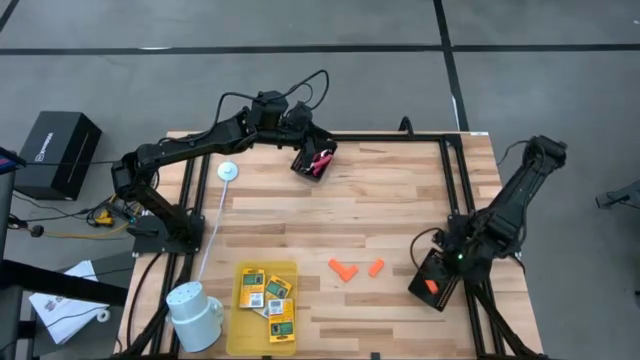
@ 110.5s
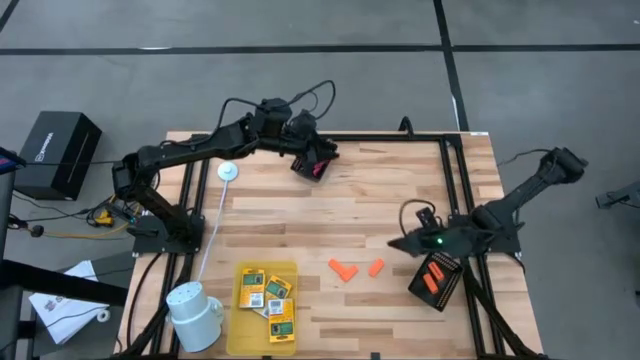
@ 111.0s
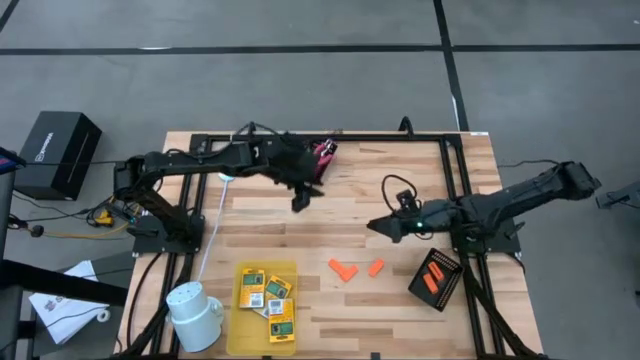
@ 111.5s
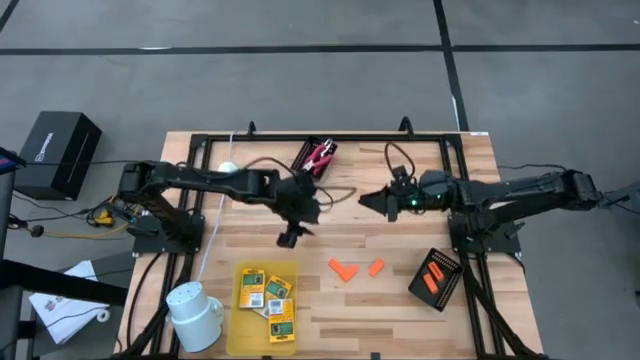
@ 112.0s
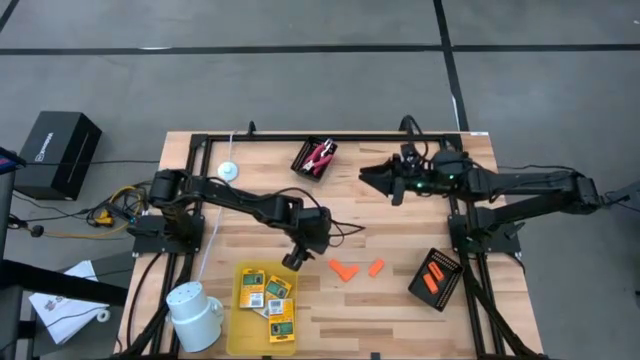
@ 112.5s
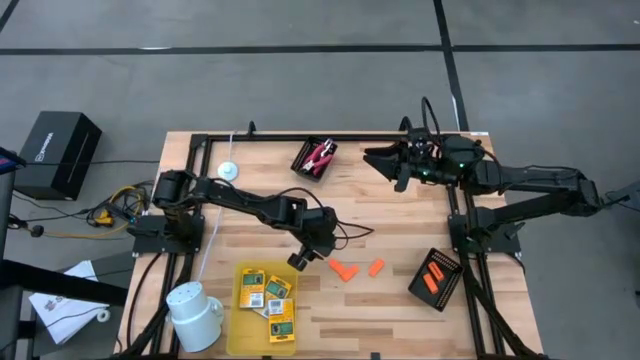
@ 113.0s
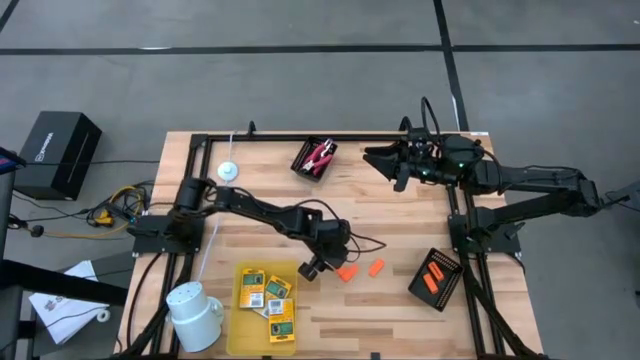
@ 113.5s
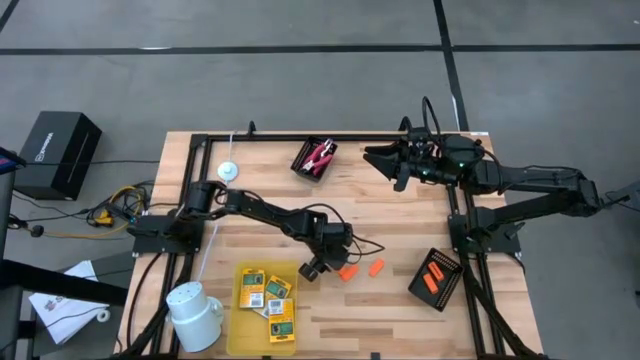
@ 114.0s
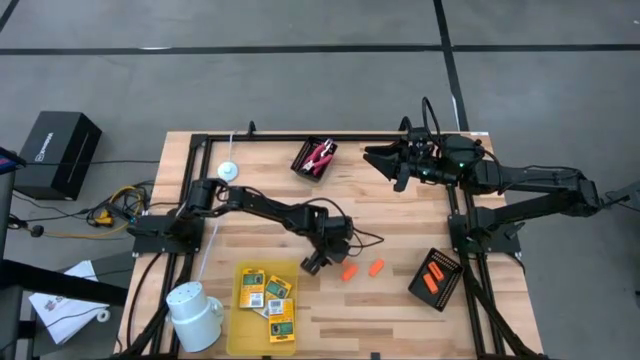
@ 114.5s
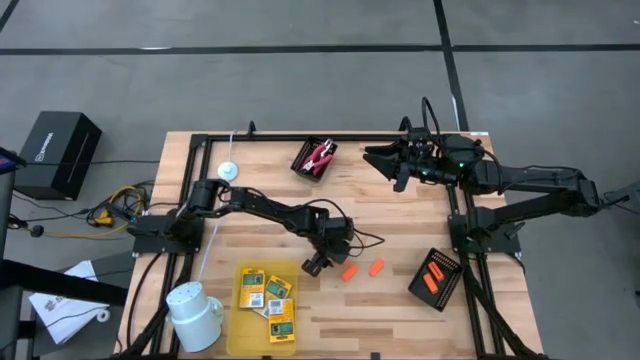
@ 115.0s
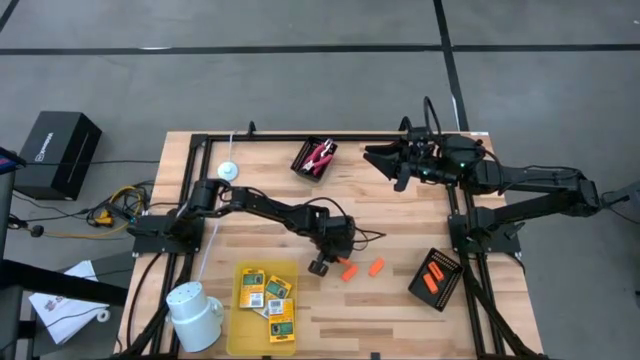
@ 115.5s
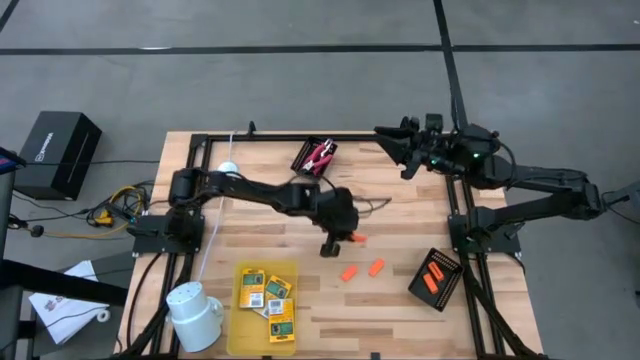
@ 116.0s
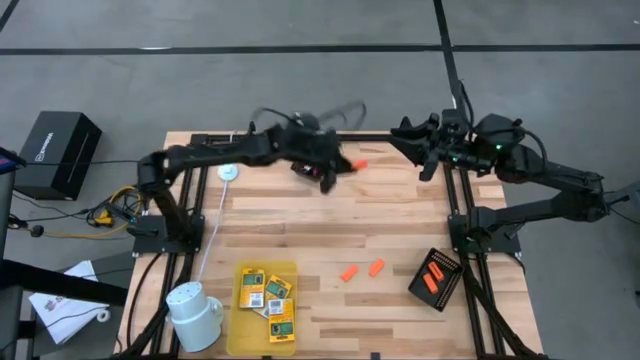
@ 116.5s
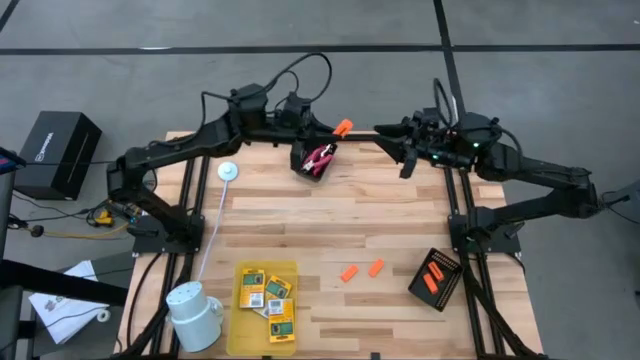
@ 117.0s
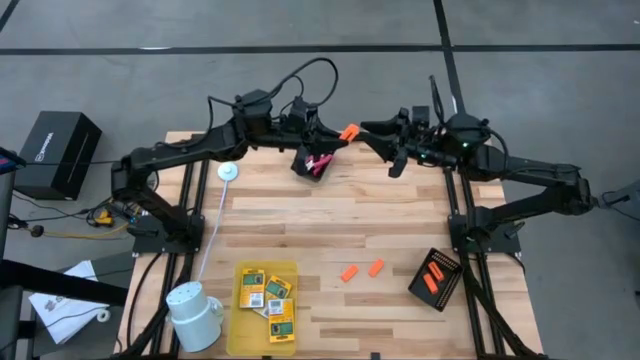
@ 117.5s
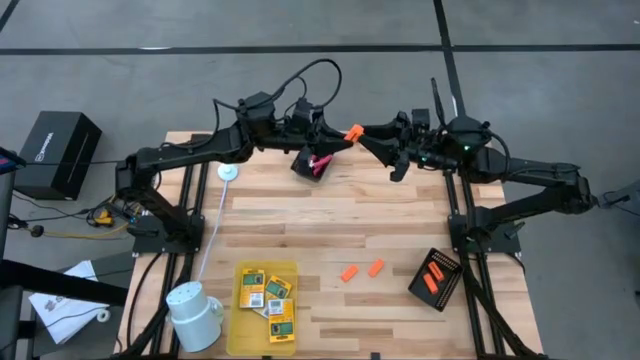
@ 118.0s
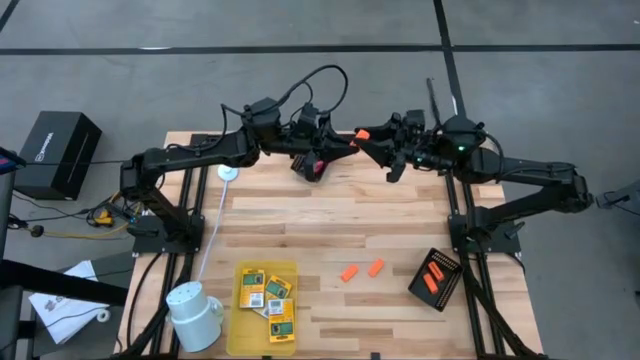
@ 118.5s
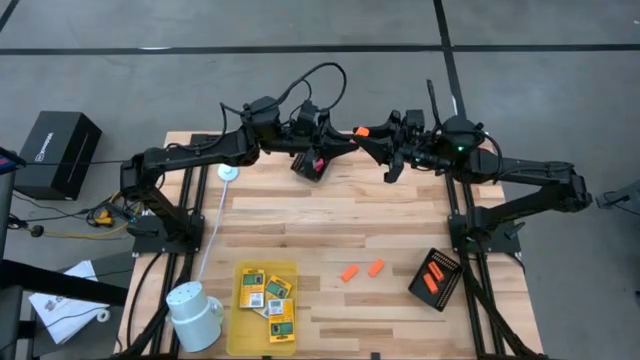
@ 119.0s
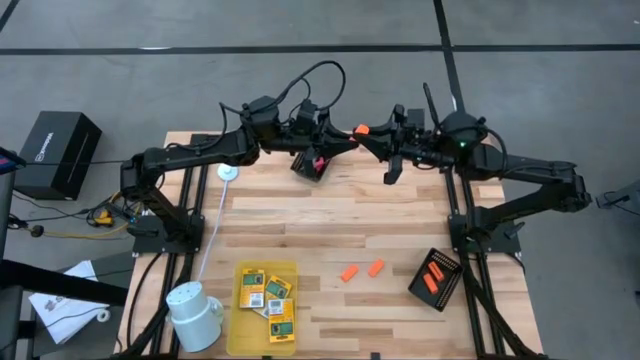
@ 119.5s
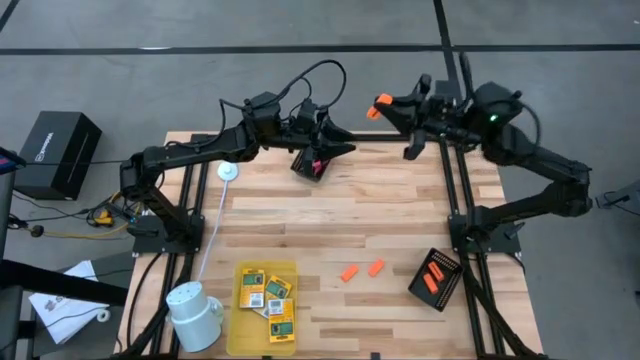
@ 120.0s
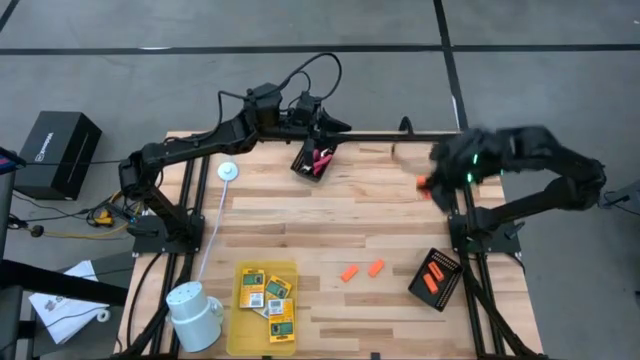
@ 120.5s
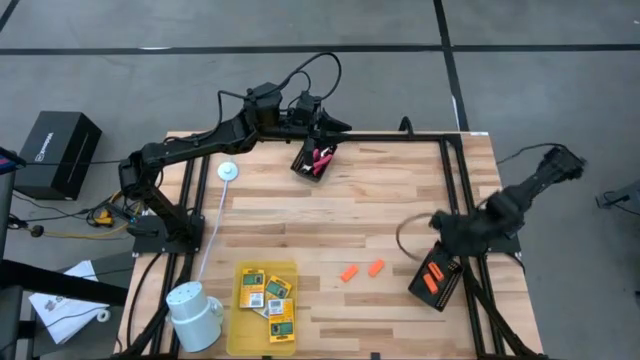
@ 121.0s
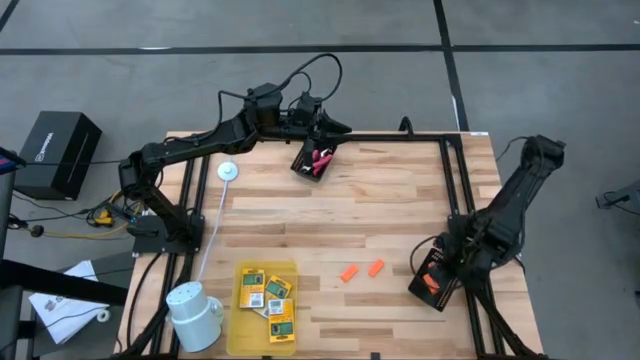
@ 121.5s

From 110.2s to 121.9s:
Task: Pick & Place School Supplies
Put the orange eraser into the bottom black bin

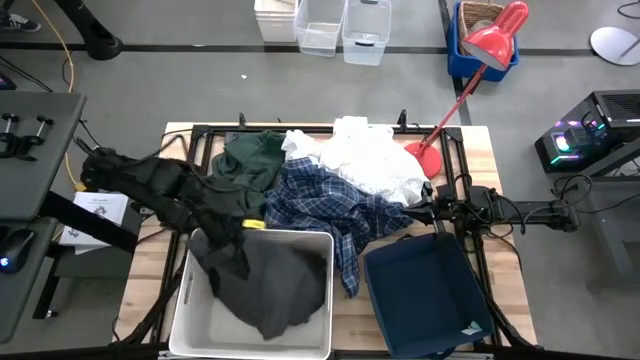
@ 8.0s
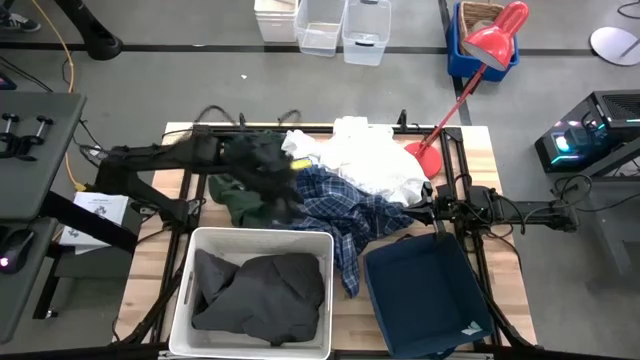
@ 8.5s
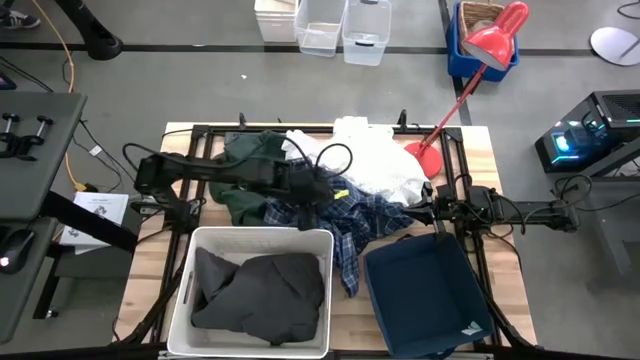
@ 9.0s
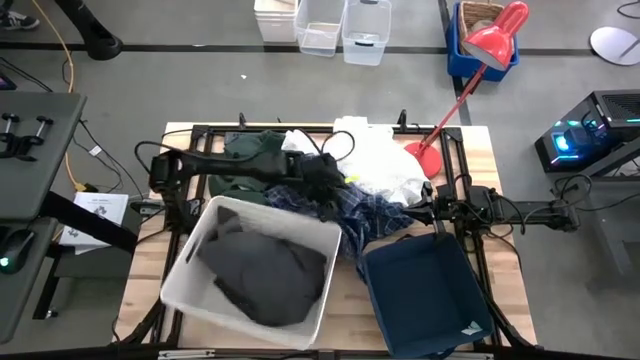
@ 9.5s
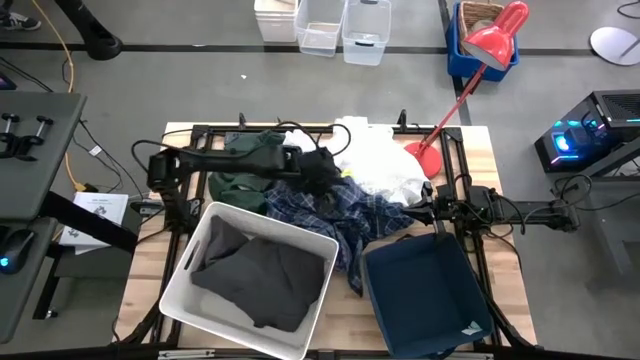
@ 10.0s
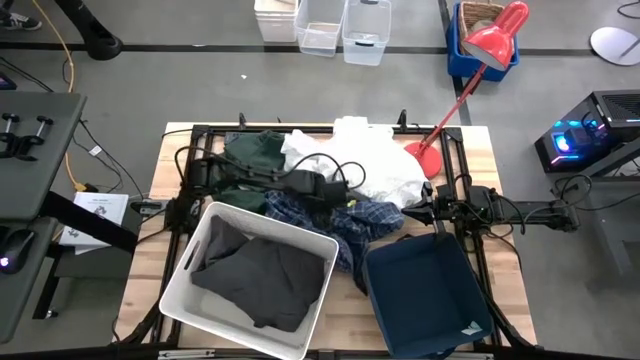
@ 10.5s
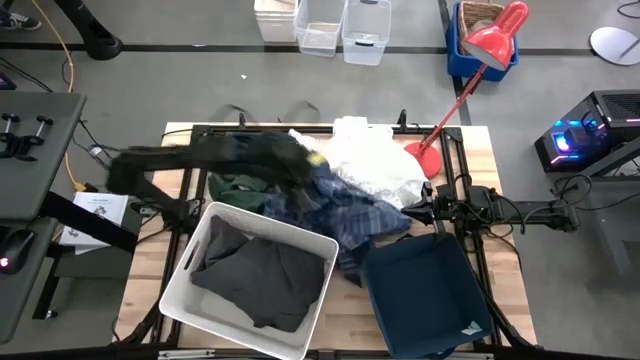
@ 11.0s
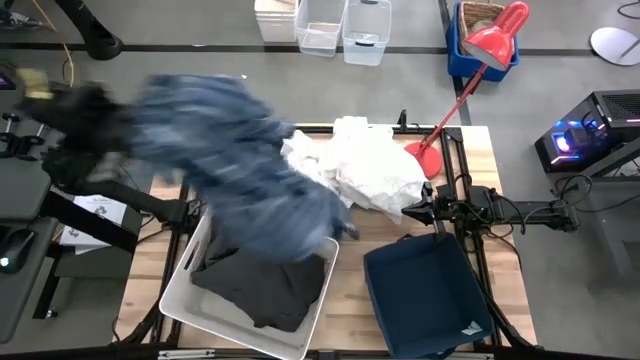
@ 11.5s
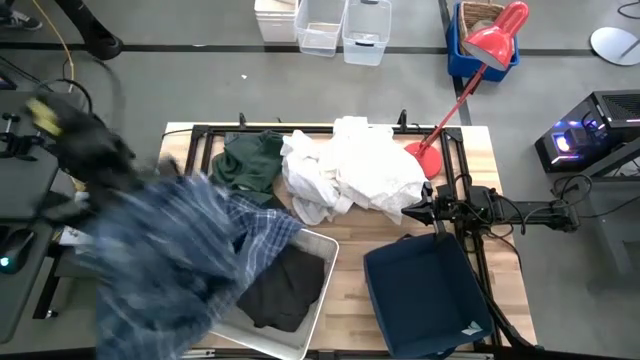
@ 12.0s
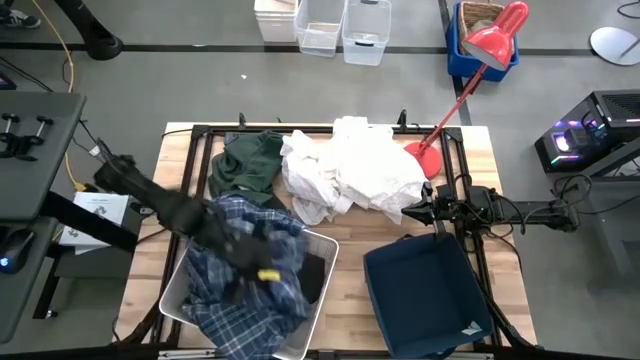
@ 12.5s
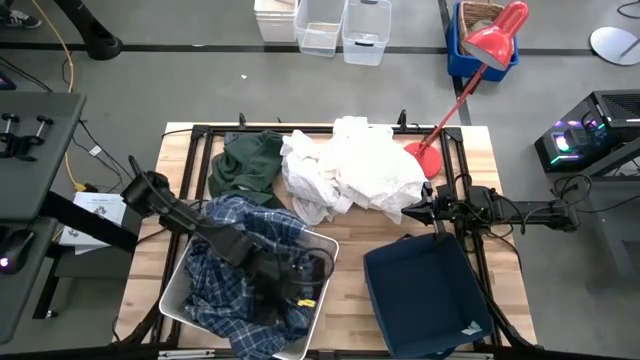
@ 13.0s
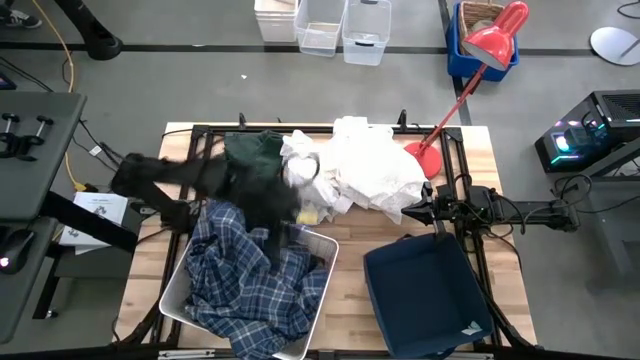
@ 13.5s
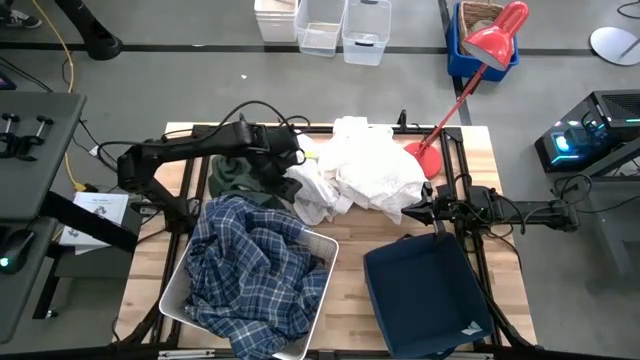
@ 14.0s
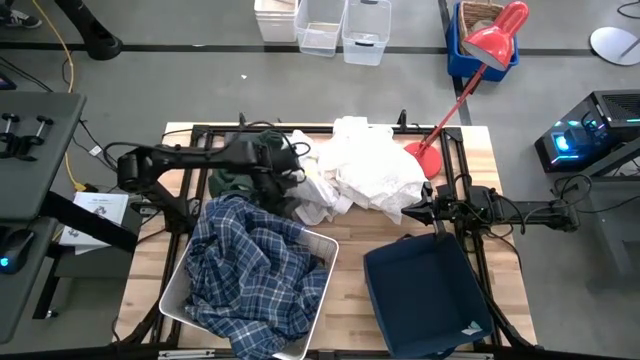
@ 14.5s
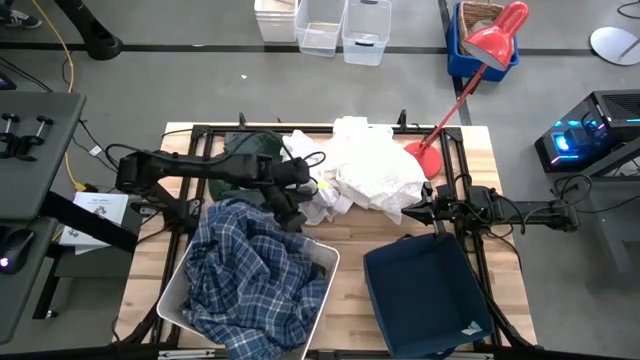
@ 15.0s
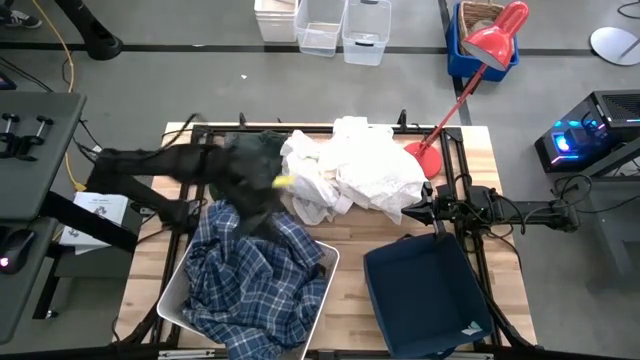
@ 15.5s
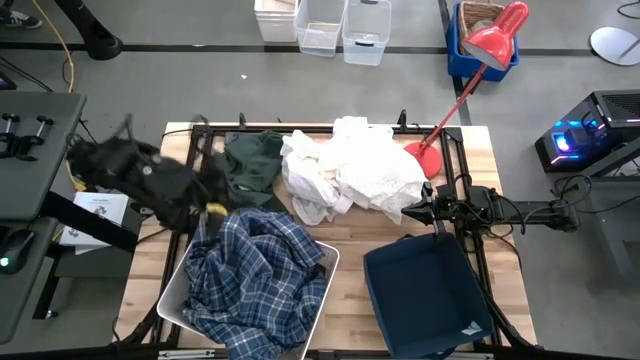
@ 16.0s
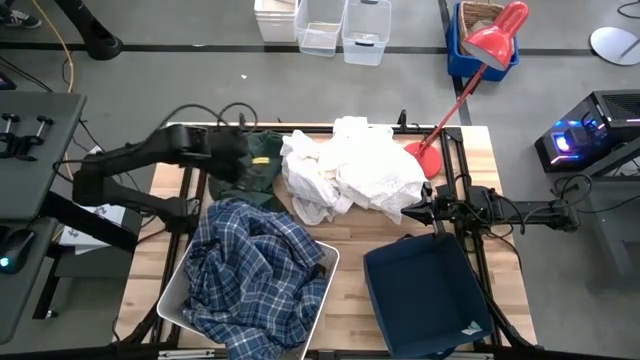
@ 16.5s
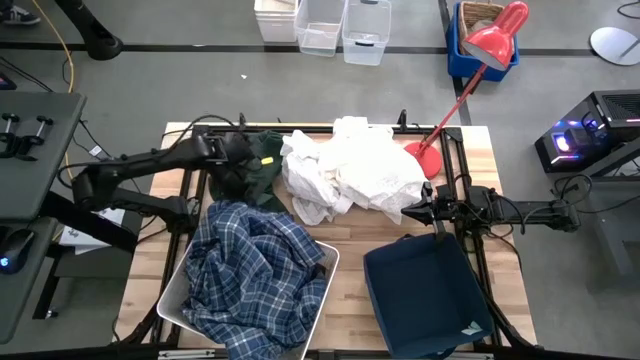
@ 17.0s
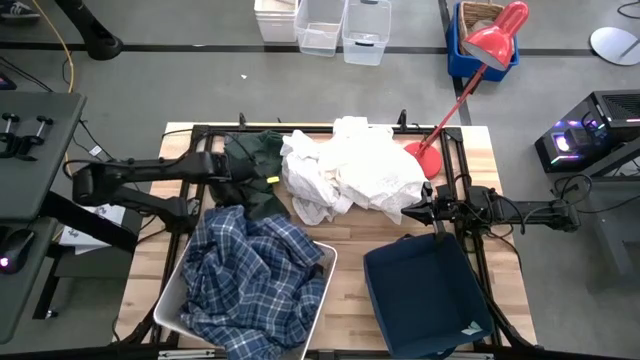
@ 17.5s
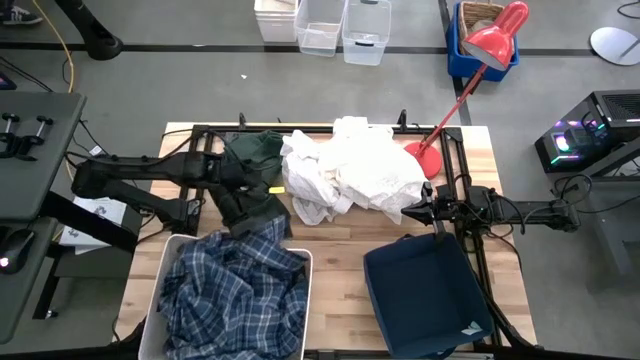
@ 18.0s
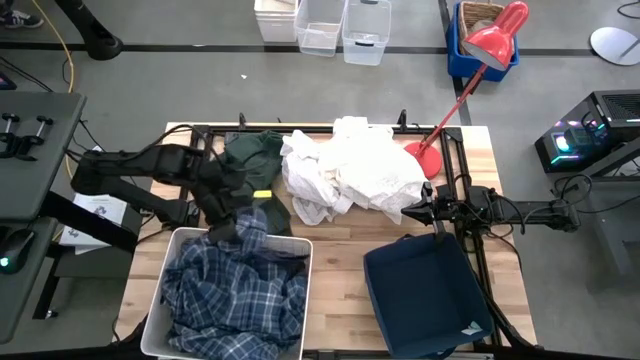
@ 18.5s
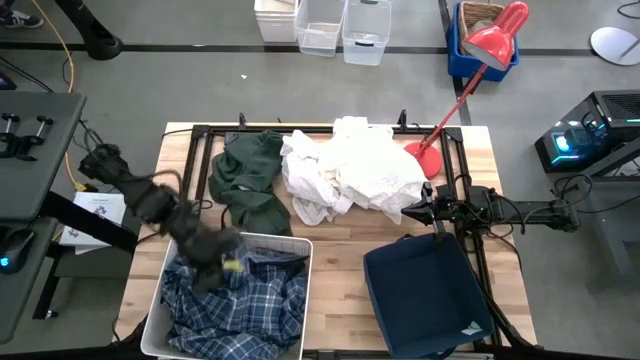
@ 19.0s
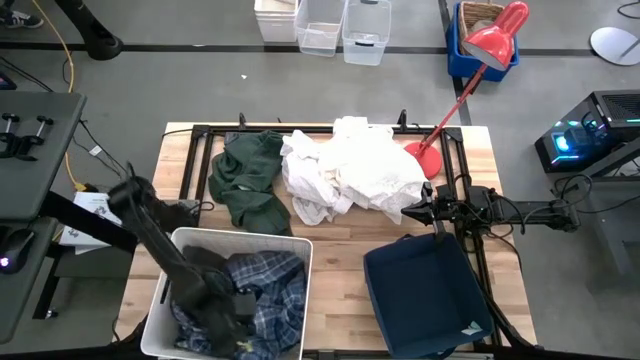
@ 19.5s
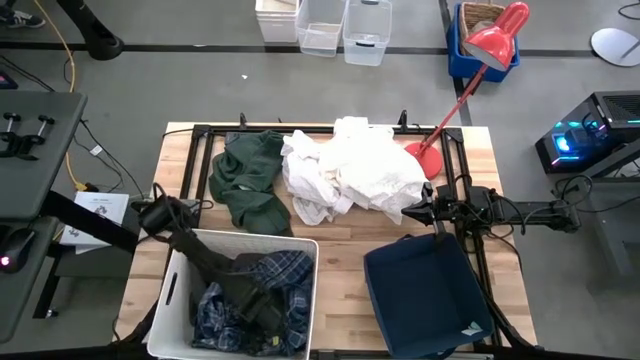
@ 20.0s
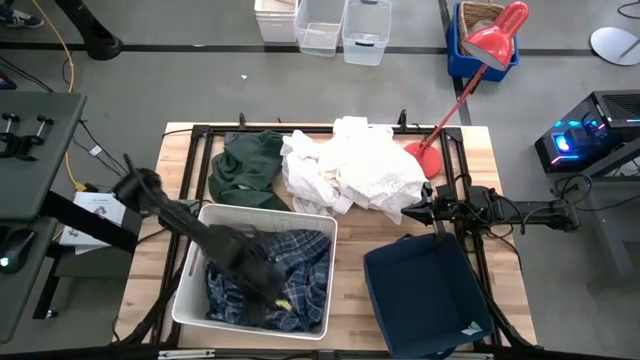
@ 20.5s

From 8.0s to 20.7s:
Task: Sort clothes
Put the blue patterned polo into the white bin
